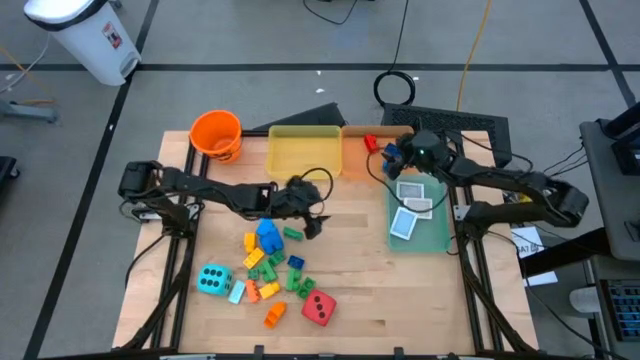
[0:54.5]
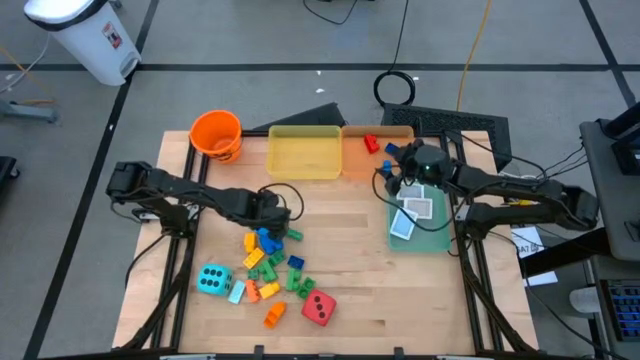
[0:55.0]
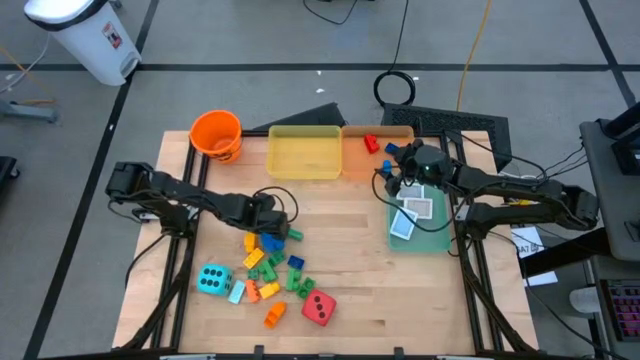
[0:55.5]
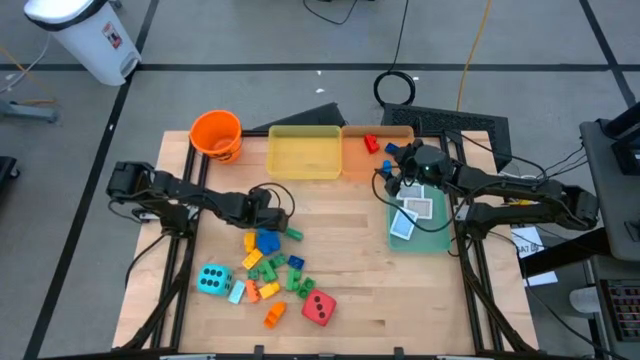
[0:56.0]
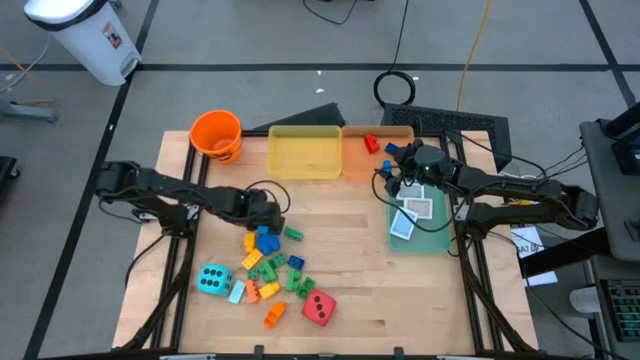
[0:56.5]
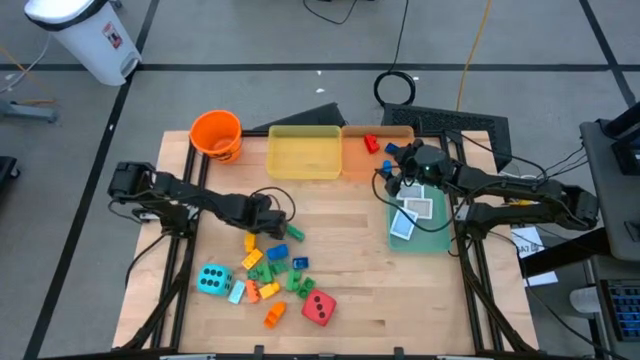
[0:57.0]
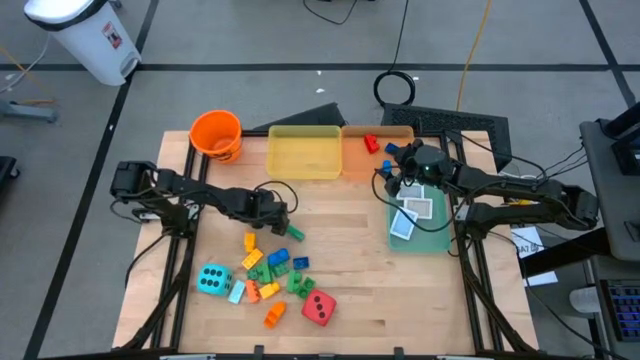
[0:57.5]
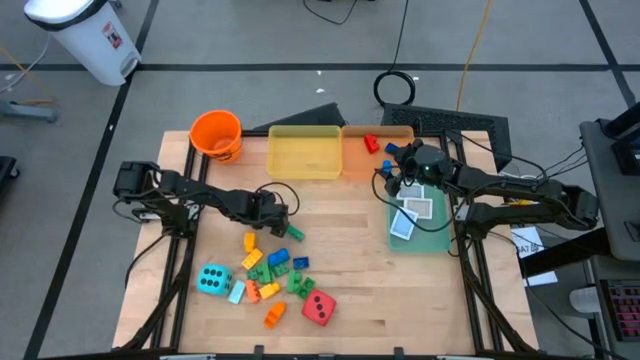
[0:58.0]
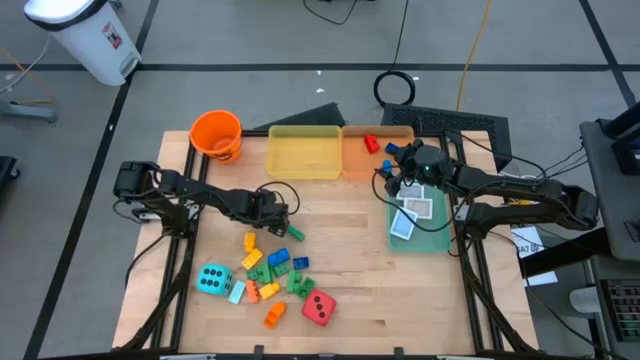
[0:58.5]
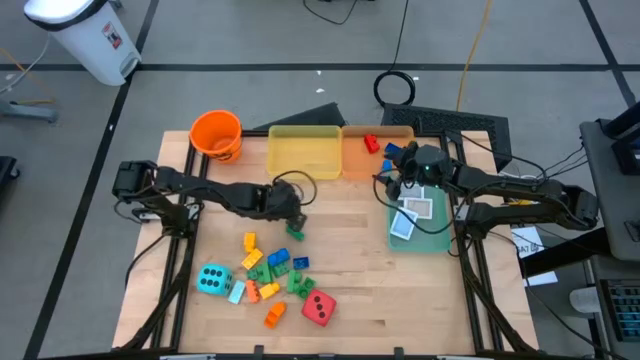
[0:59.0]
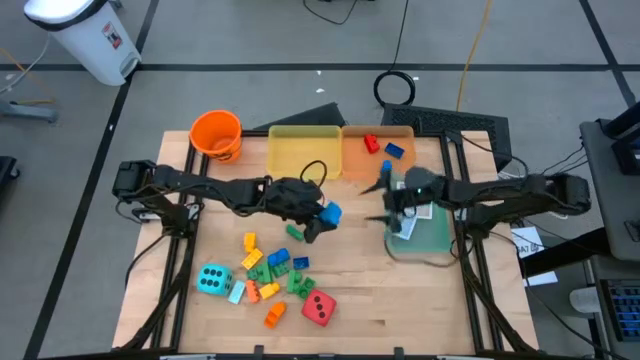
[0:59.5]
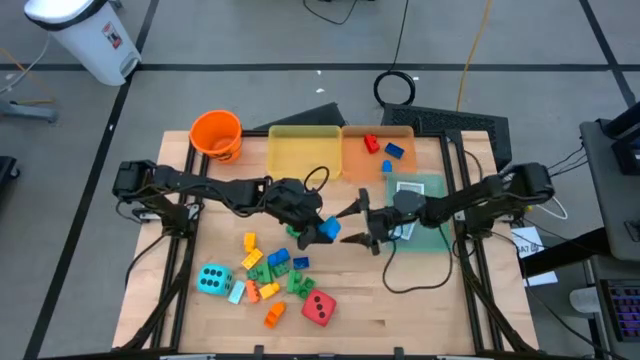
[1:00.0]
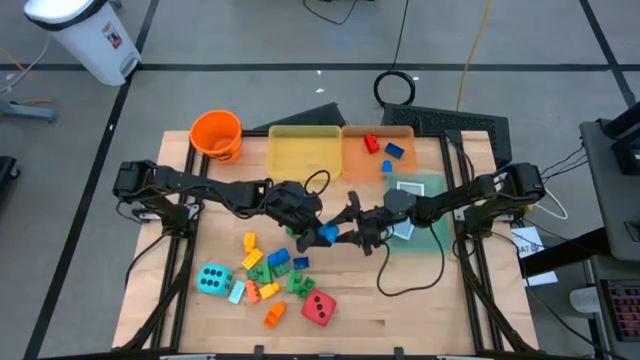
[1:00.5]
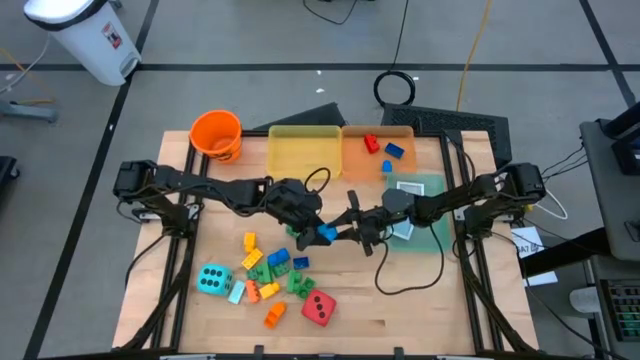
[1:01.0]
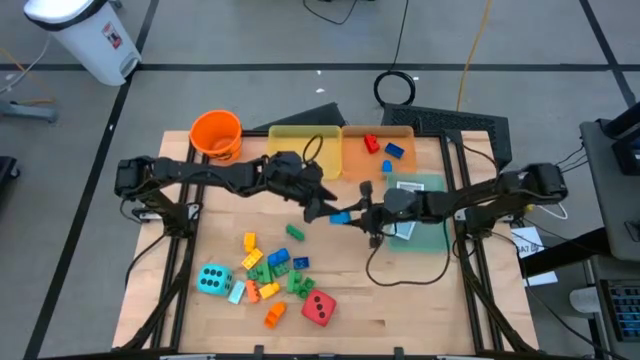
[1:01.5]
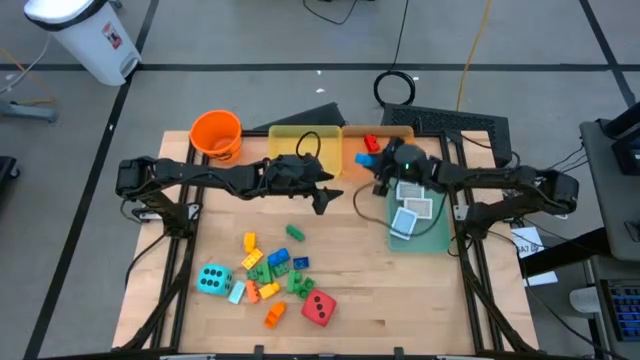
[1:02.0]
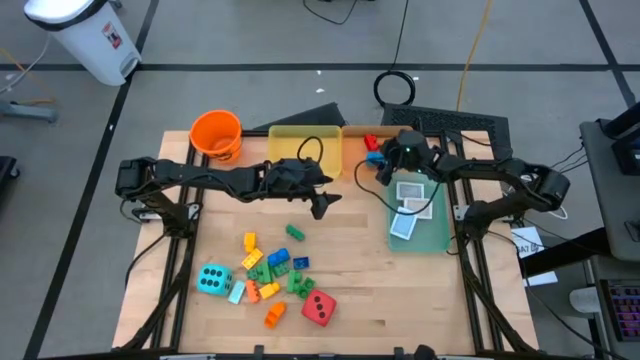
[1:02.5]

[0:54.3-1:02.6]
Task: Pick & Place Toys
Put the blue game piece into the orange bin

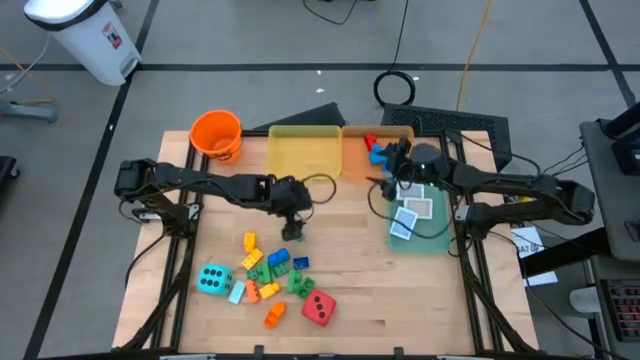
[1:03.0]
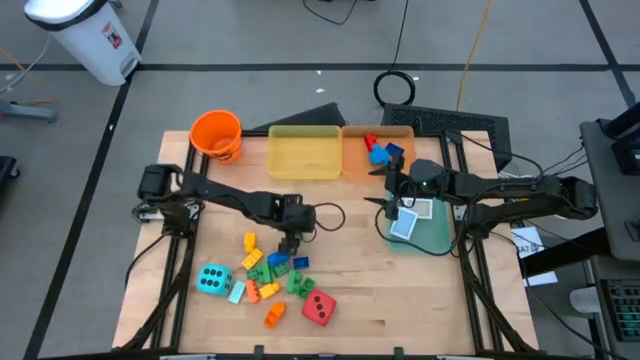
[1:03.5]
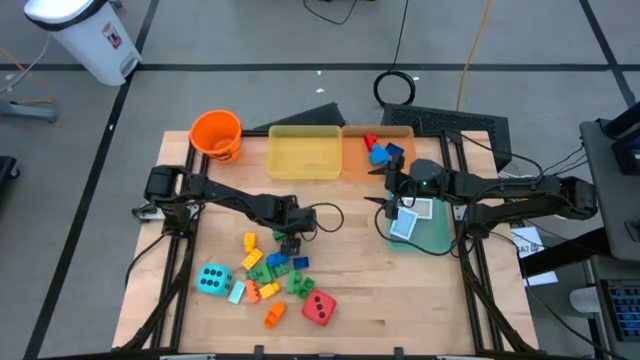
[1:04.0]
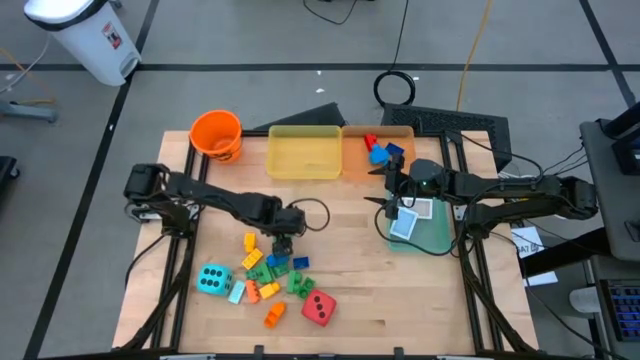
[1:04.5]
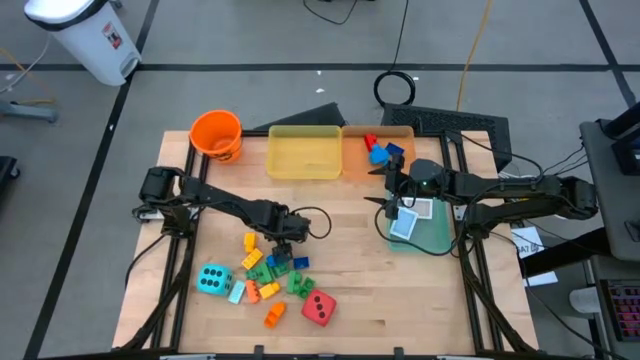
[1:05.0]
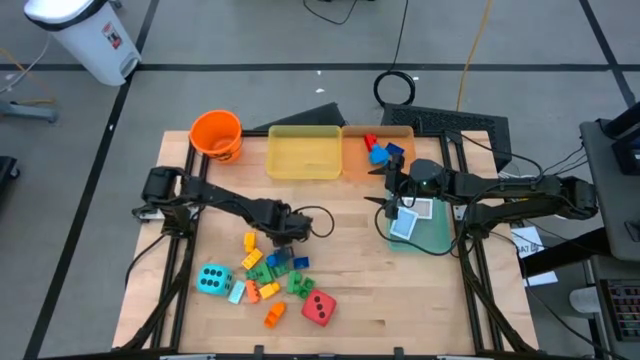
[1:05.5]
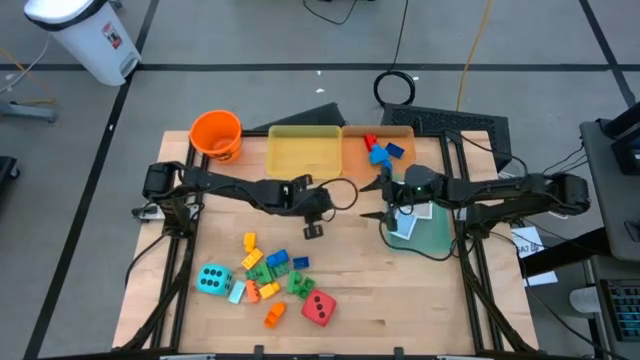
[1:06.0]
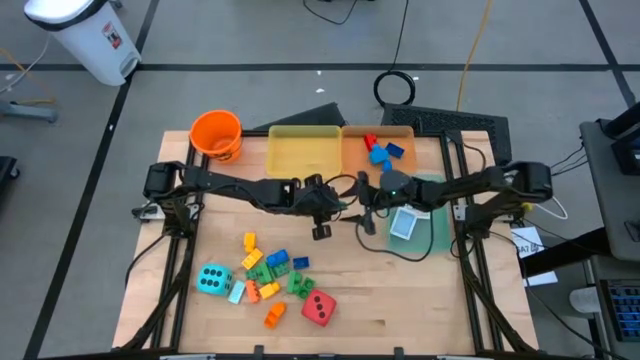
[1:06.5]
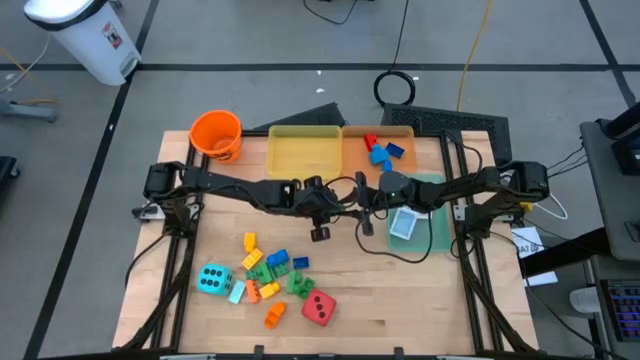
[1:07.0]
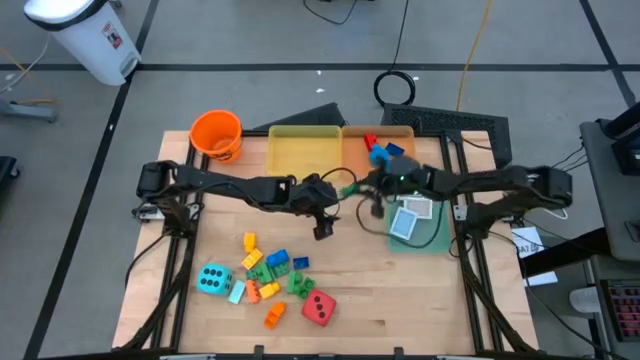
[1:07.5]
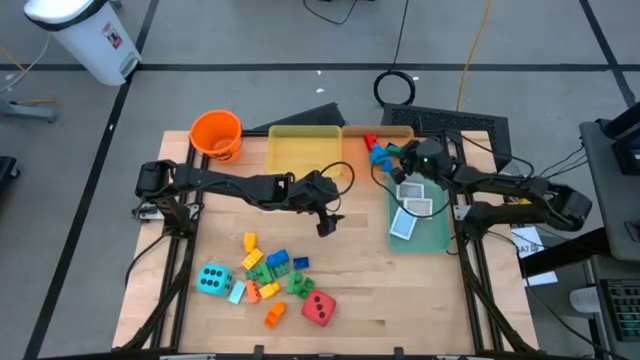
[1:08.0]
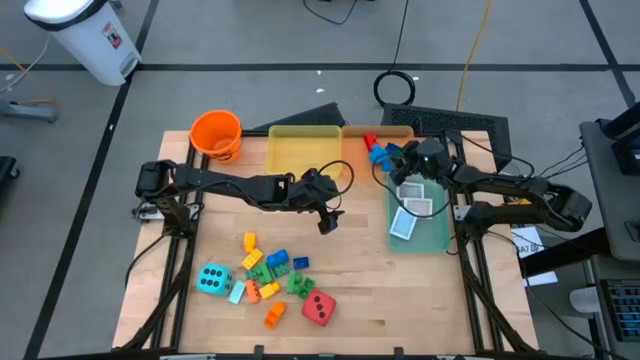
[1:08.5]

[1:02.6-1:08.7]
Put the green game piece into the orange bin

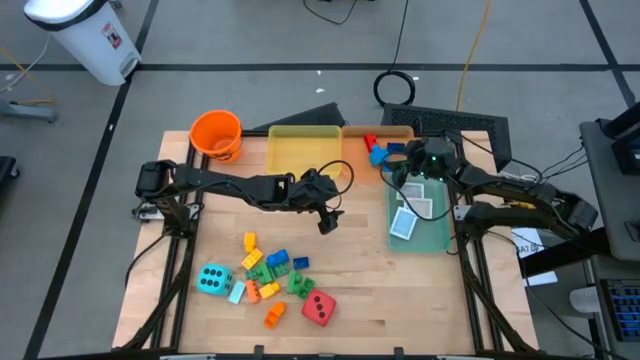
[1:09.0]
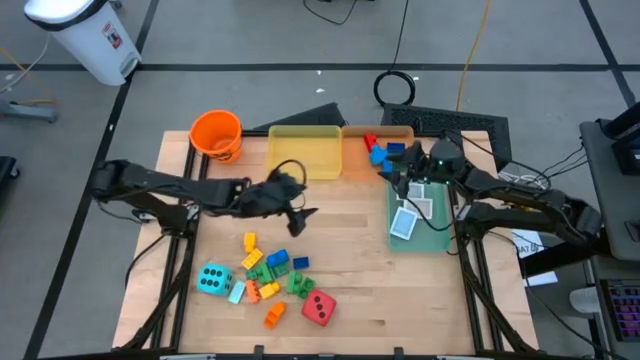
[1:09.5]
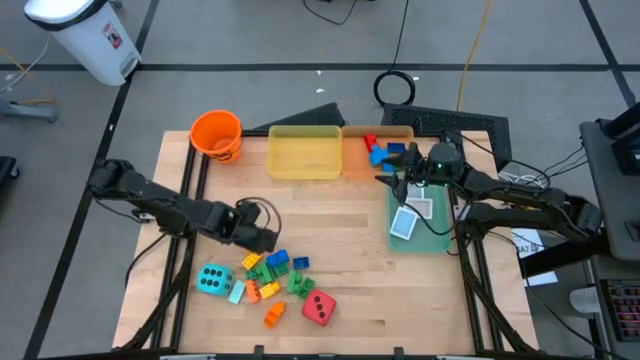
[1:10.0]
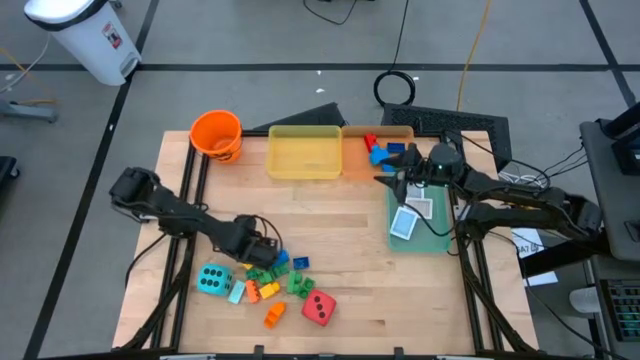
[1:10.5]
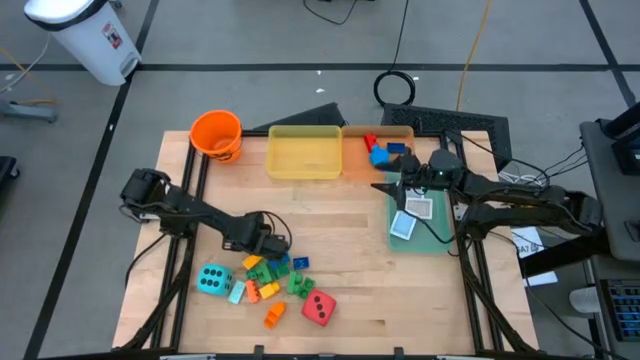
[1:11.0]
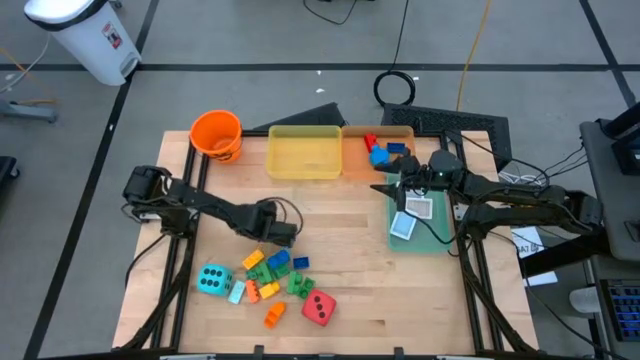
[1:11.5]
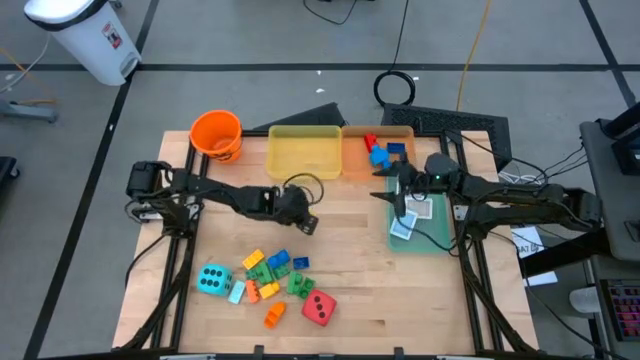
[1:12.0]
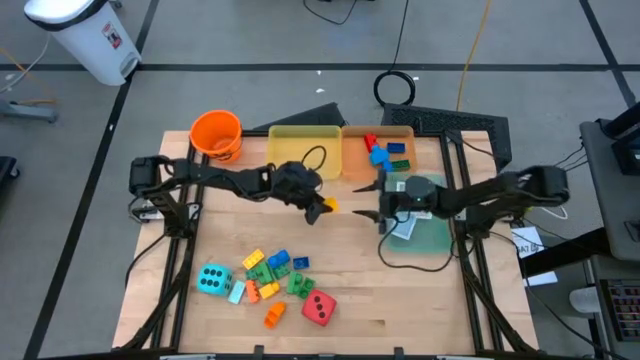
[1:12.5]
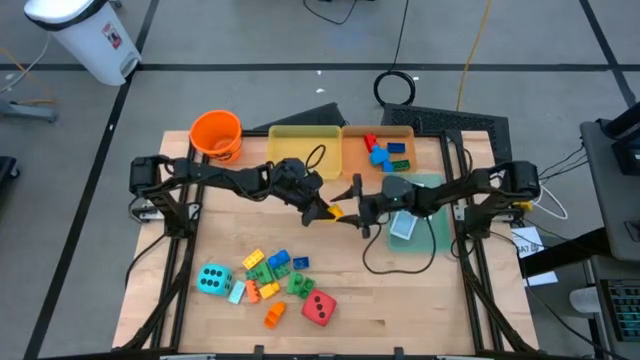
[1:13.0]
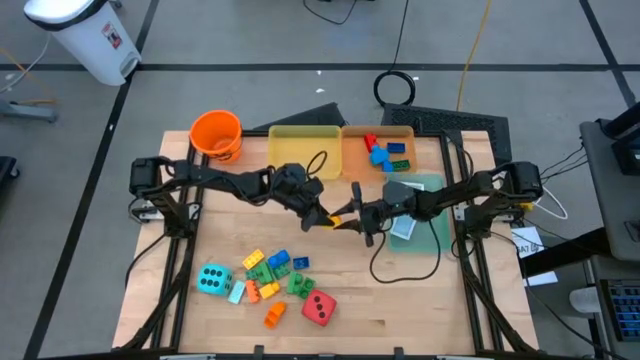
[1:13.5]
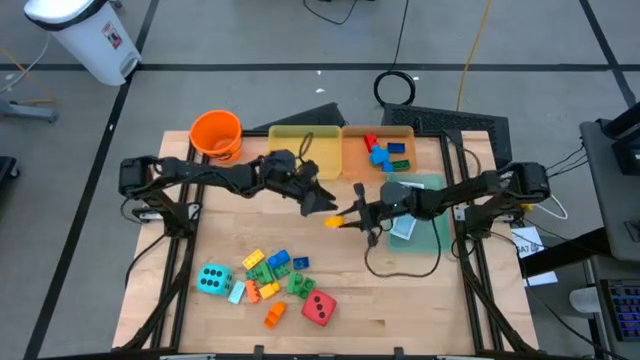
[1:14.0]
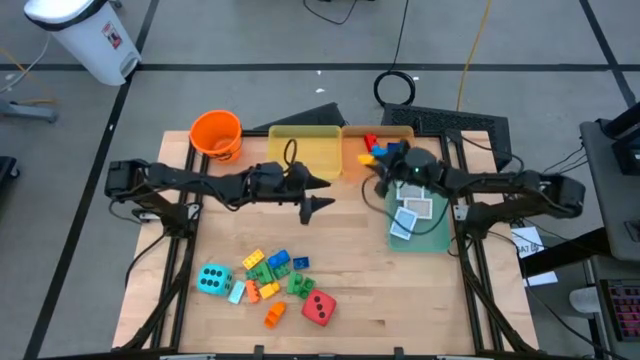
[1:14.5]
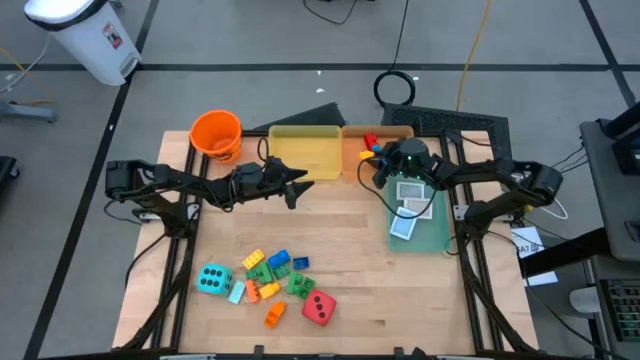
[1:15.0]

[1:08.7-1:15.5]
Put the yellow game piece into the orange bin

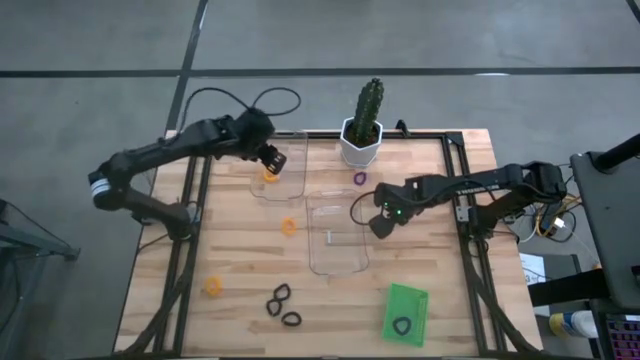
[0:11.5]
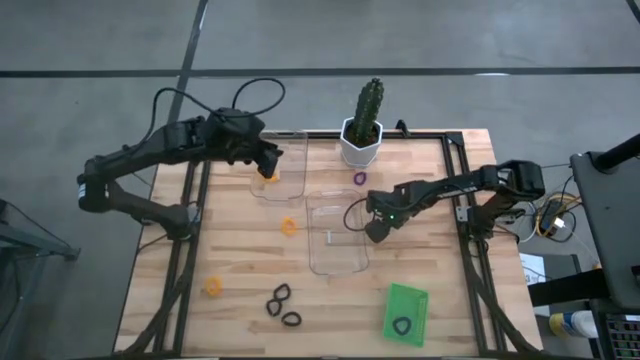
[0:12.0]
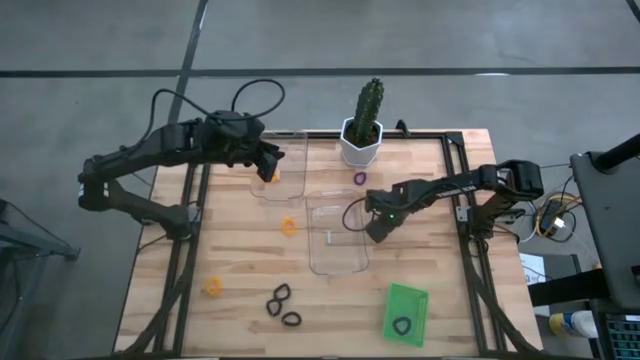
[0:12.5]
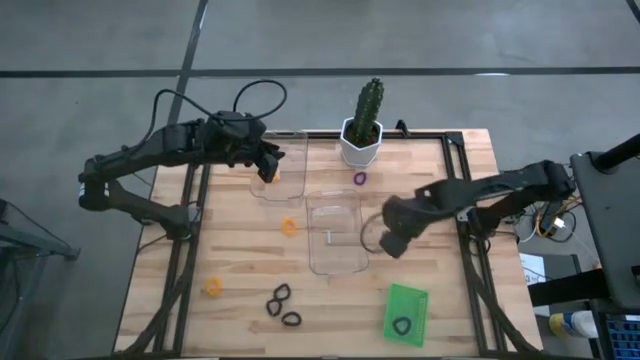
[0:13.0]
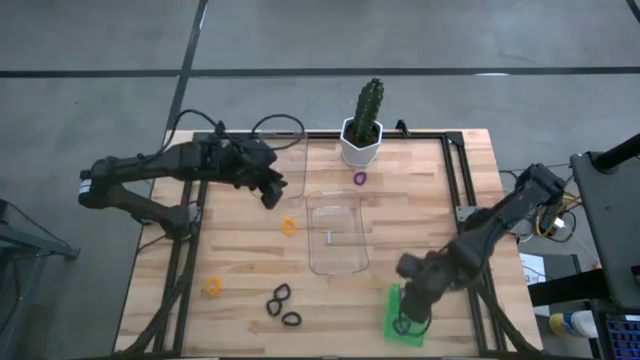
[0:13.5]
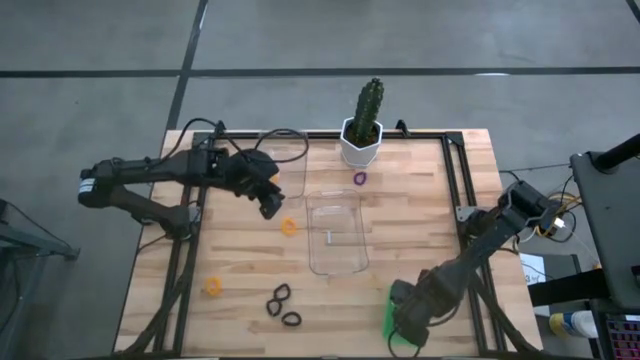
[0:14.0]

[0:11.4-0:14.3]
Task: Sort spring keychains
Put the bottom purple spring keychain into the green bin
